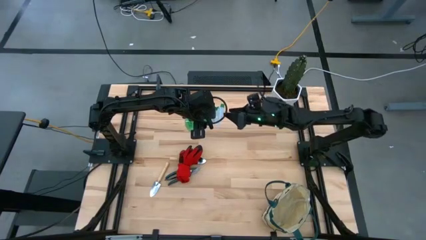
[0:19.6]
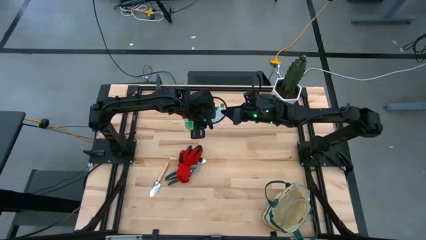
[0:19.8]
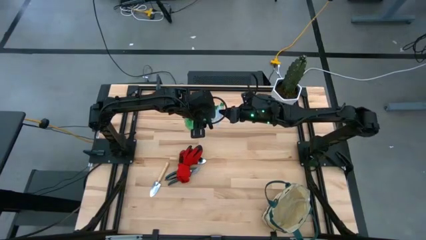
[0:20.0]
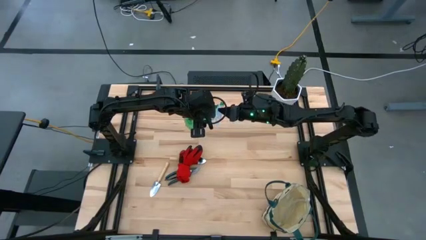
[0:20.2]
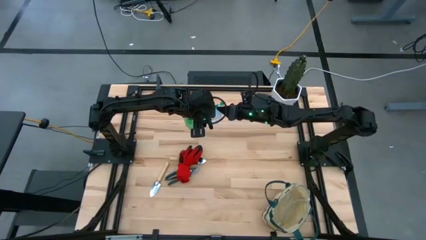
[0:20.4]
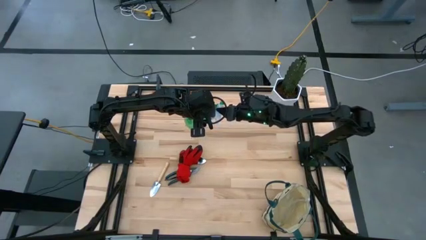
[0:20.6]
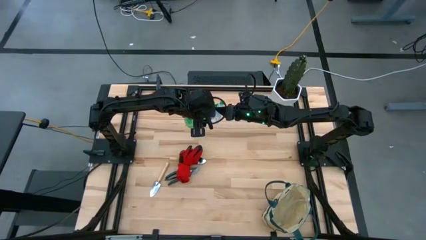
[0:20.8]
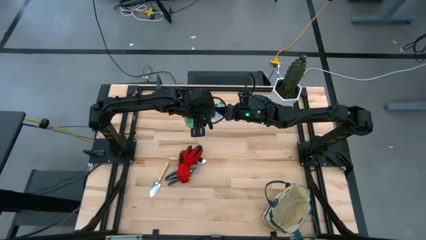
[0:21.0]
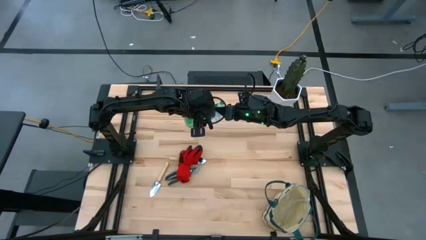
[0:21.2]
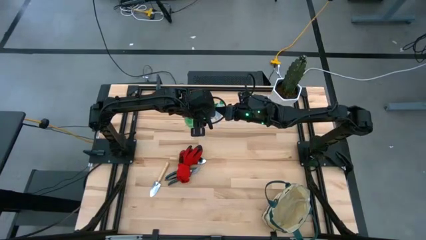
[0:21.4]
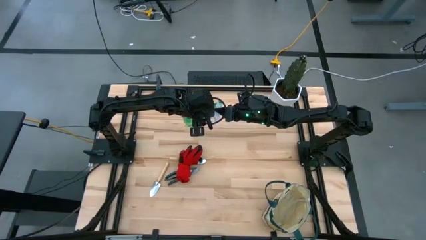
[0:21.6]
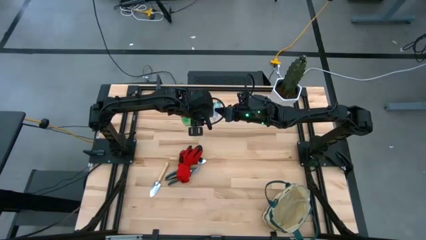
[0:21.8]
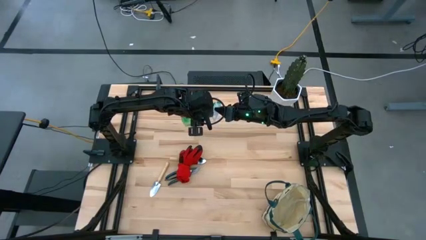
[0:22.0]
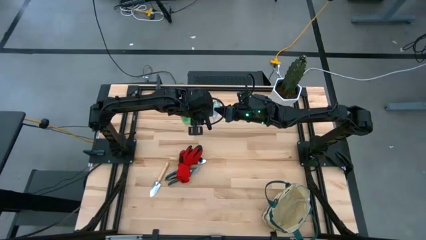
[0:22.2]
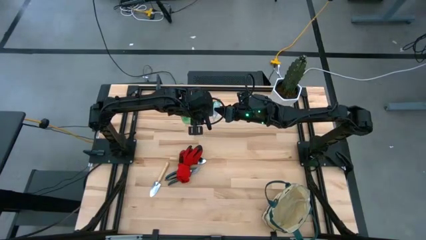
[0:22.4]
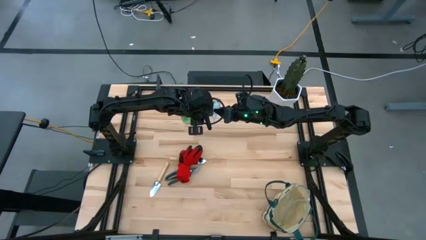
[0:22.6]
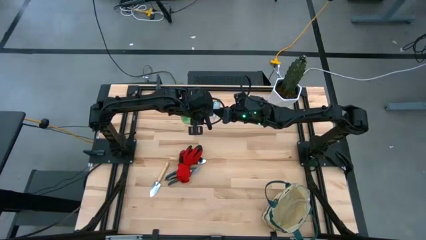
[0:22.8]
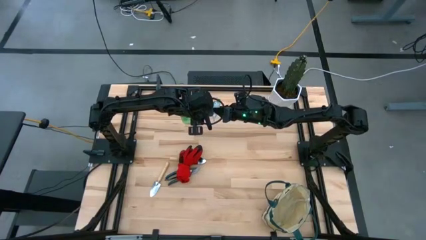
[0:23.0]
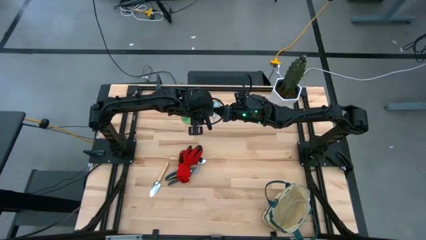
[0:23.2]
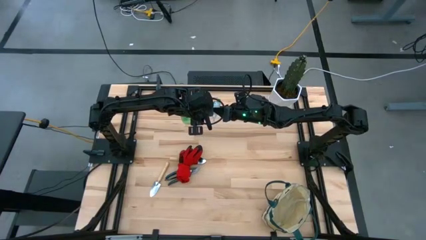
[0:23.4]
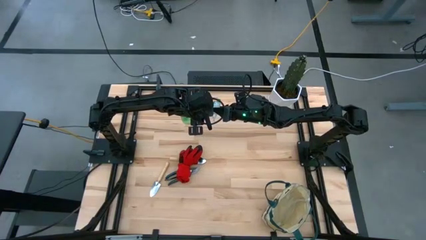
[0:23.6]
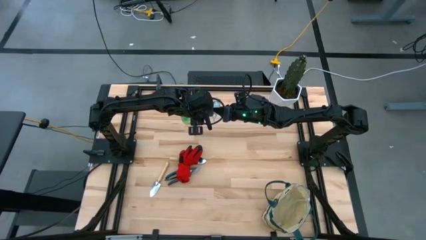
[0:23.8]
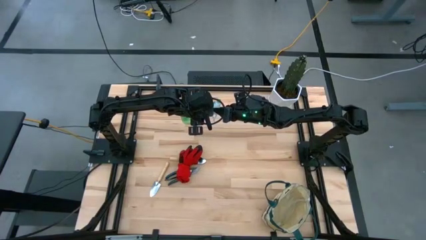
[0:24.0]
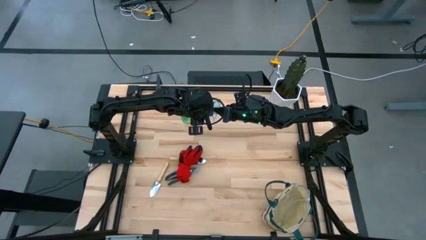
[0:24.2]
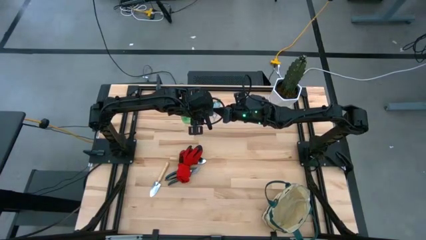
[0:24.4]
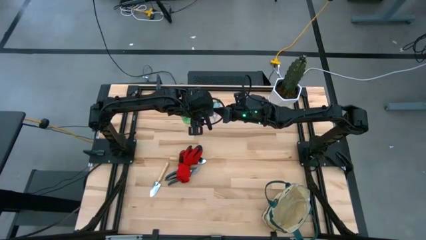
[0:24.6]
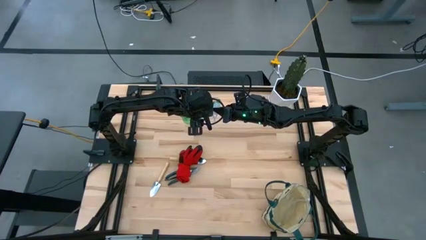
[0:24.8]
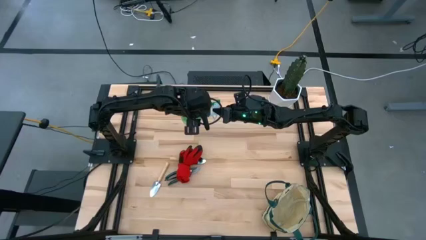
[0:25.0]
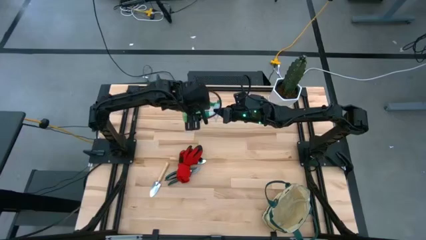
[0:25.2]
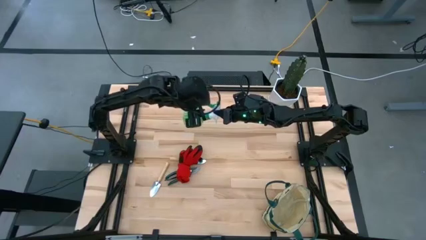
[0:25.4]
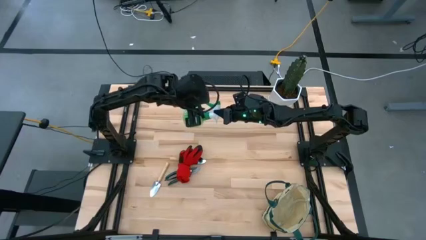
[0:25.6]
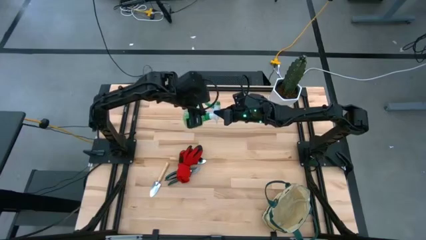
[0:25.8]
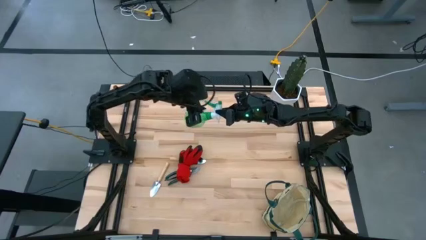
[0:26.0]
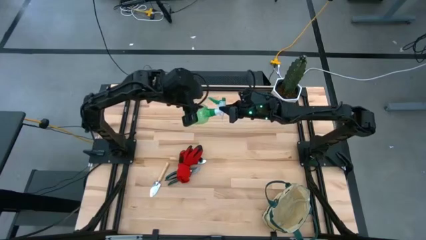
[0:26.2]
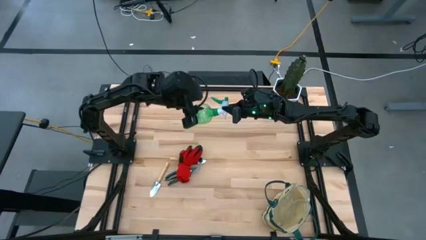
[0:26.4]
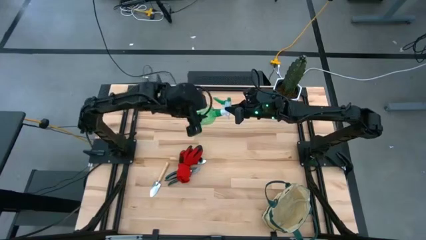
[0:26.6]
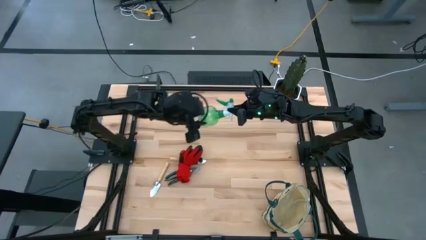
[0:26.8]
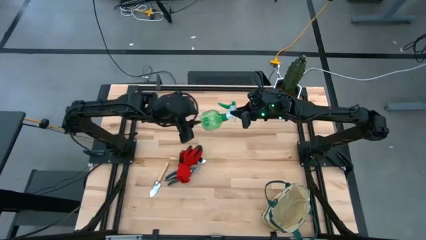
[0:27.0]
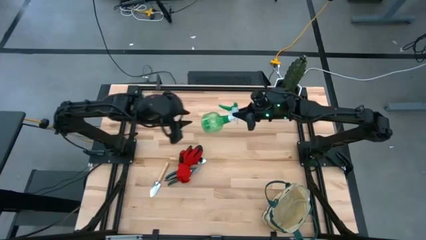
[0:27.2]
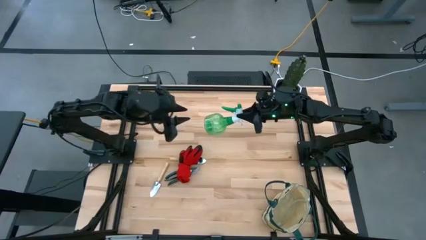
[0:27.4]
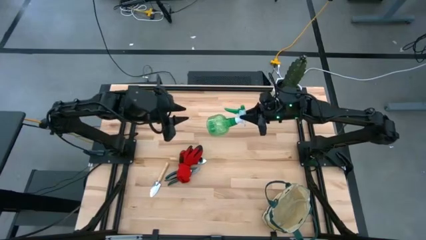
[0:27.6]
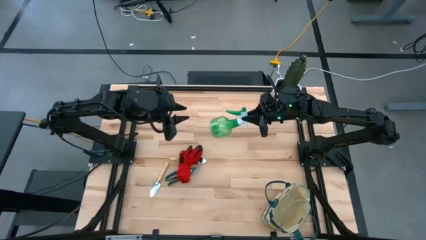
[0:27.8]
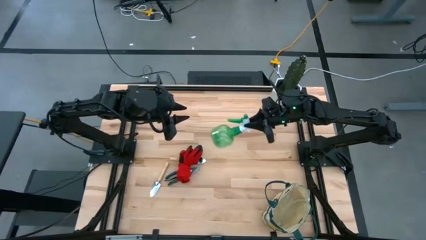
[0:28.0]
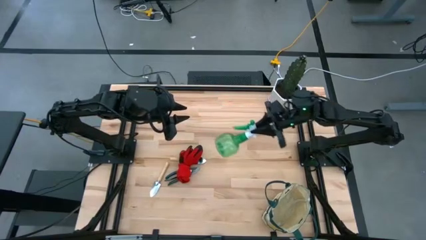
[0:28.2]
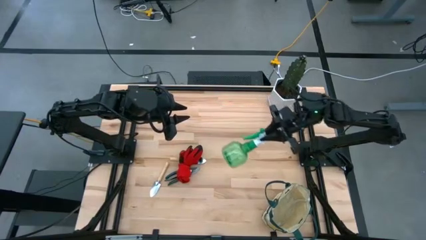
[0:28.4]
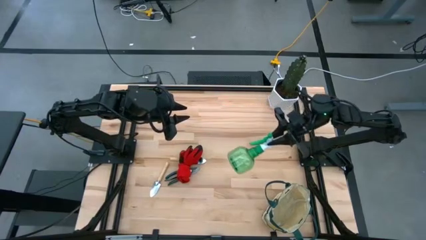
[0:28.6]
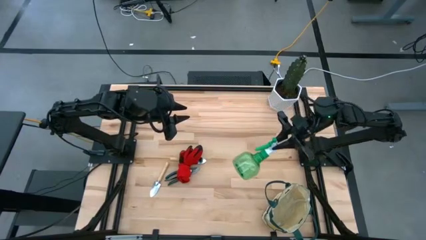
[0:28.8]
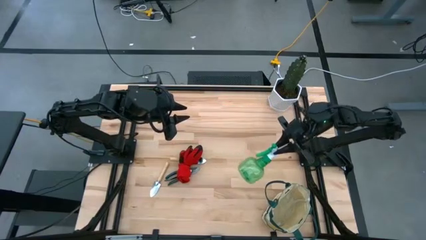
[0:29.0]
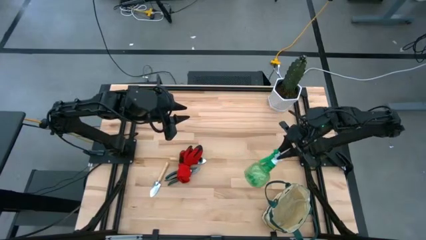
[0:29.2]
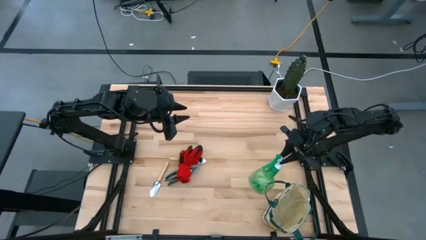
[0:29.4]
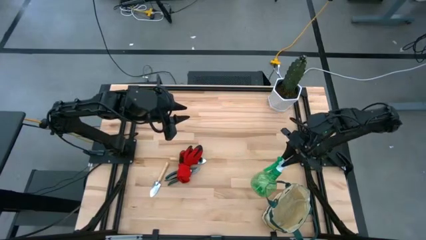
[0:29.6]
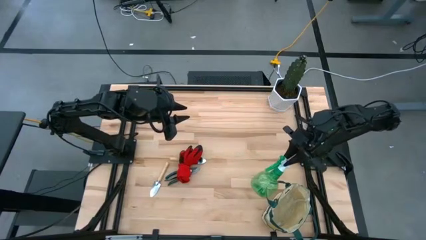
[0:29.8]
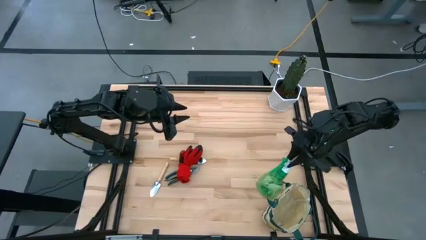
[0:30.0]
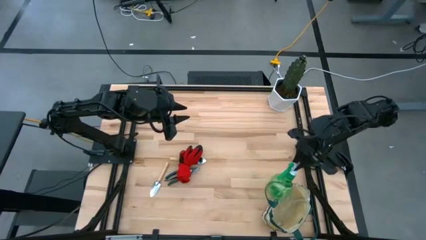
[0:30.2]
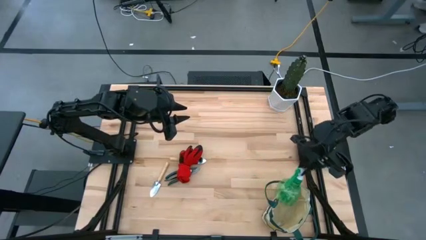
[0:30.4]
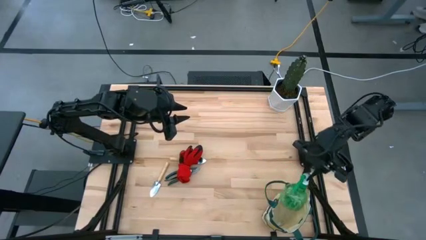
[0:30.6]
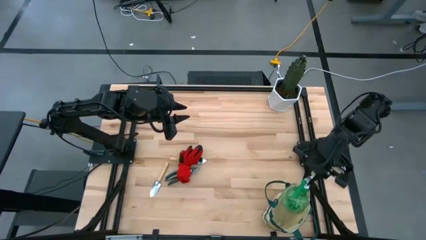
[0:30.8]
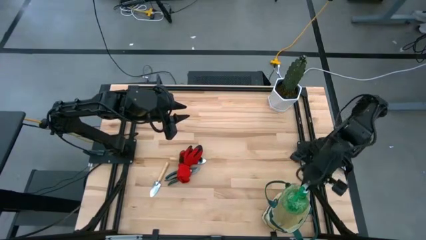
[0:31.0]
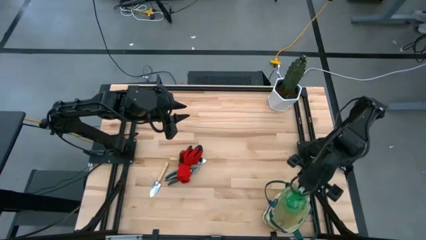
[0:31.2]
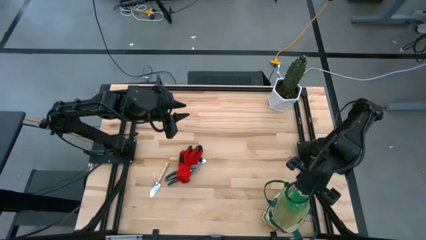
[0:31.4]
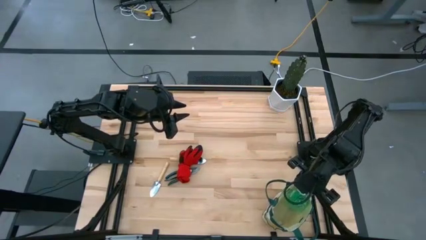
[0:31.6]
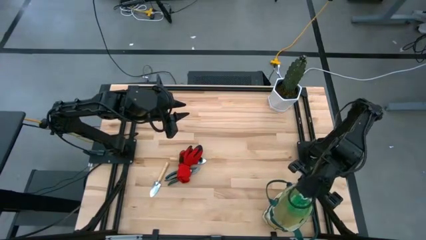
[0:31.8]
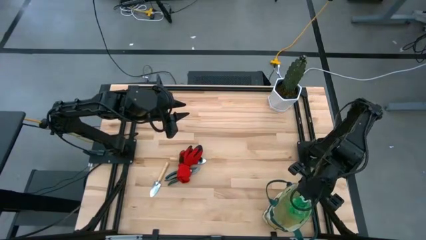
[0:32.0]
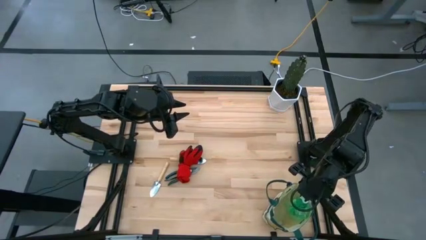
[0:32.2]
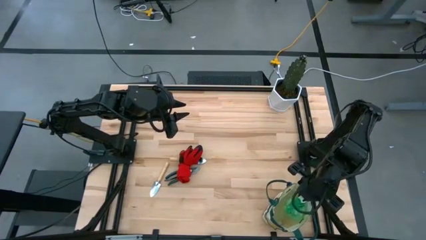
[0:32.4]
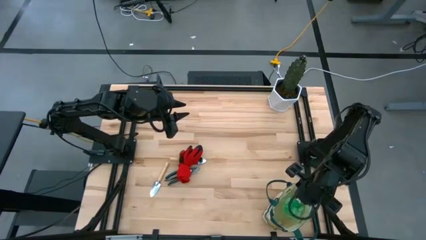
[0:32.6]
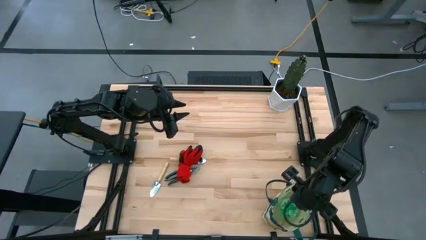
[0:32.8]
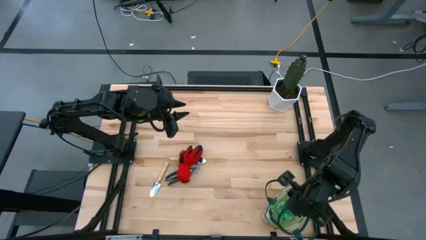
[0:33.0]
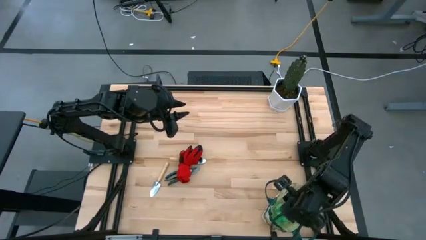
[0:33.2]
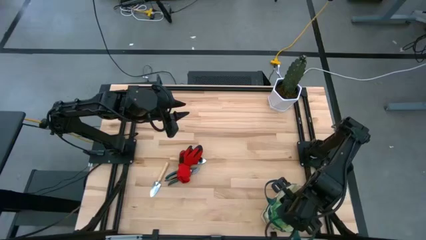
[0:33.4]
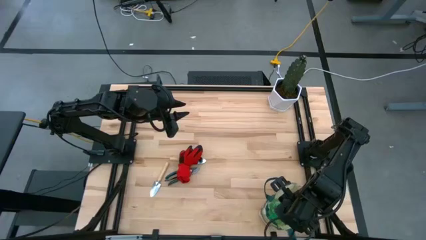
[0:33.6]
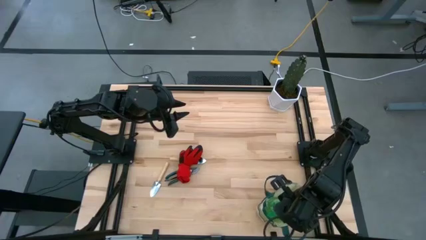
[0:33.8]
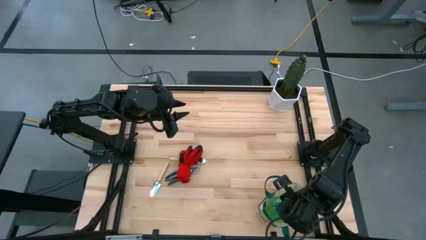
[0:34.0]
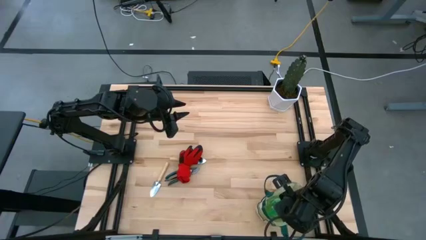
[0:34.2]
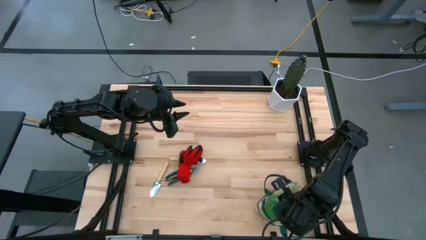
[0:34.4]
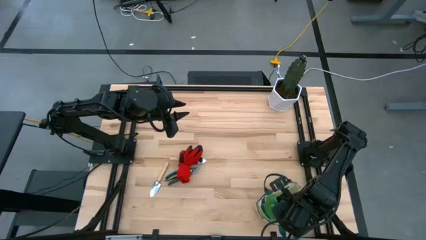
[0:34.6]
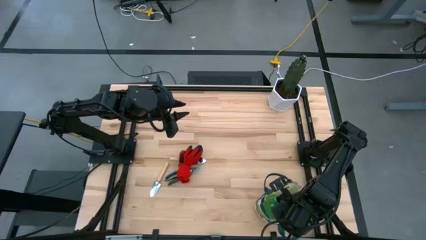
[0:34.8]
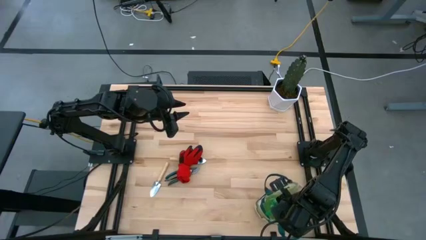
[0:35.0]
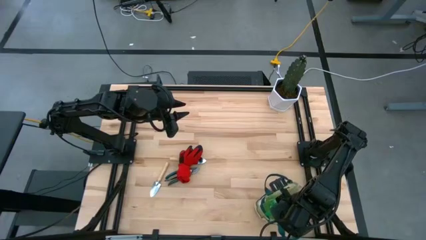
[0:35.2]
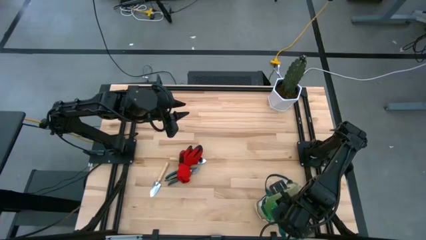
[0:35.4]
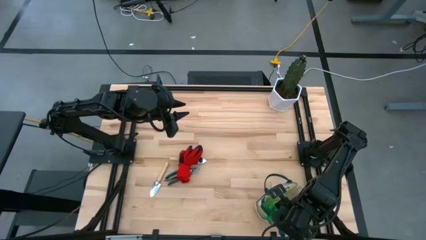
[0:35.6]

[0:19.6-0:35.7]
Task: Pick & Place Garden tools in Gardening bag
Put the green spray bottle into the gardening tool bag
